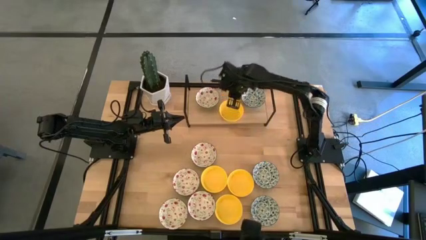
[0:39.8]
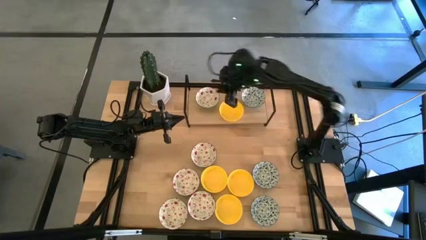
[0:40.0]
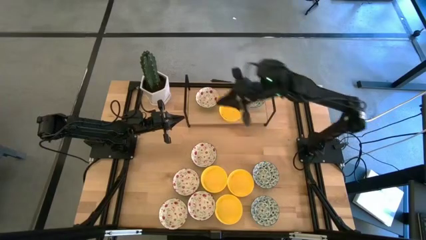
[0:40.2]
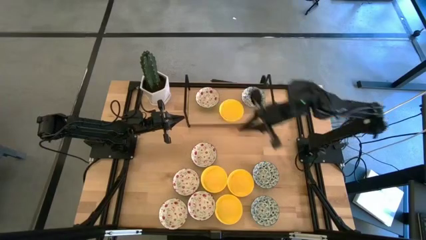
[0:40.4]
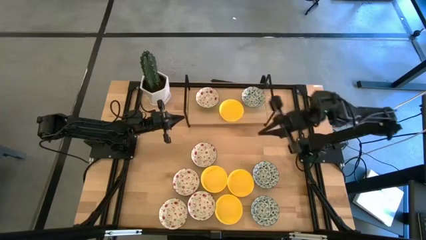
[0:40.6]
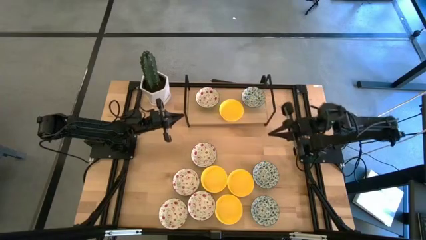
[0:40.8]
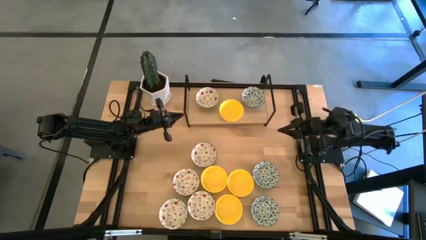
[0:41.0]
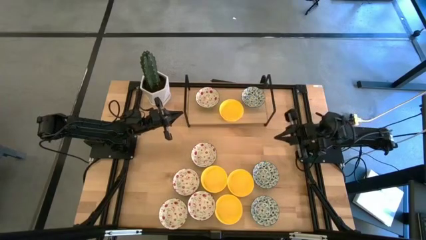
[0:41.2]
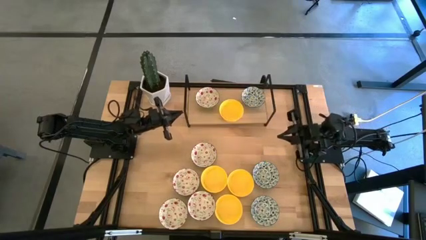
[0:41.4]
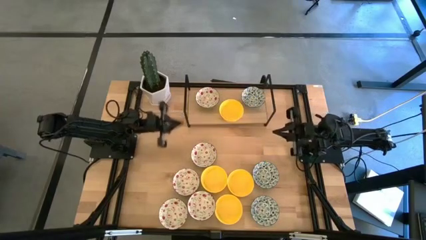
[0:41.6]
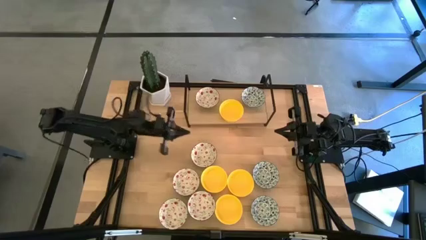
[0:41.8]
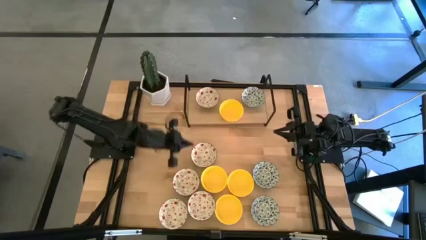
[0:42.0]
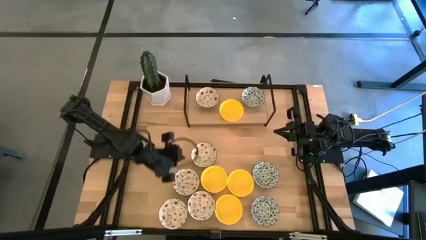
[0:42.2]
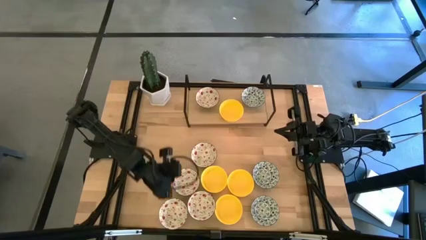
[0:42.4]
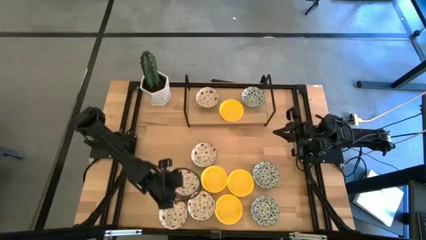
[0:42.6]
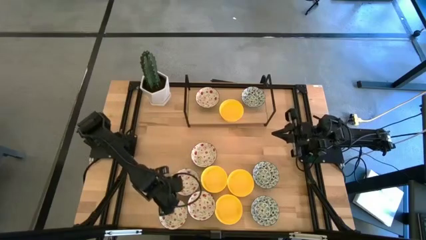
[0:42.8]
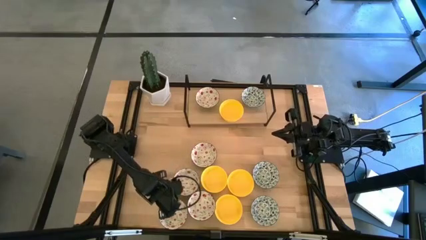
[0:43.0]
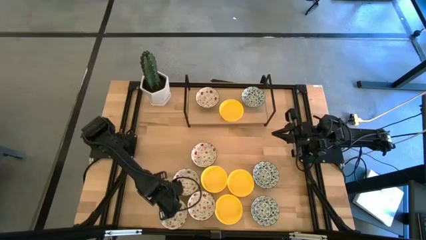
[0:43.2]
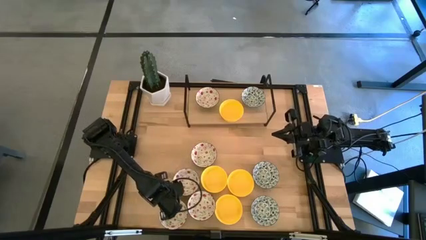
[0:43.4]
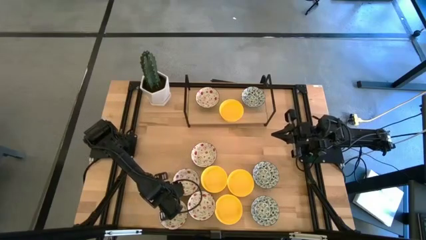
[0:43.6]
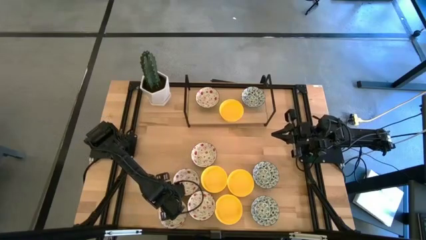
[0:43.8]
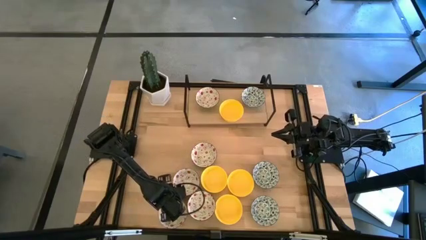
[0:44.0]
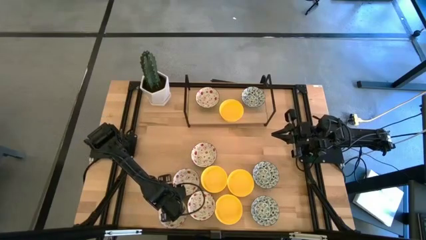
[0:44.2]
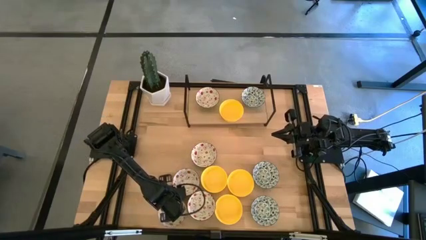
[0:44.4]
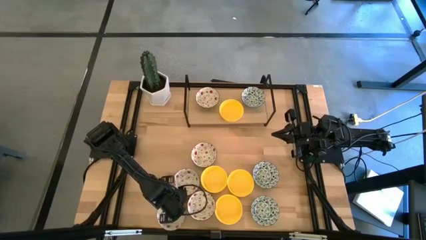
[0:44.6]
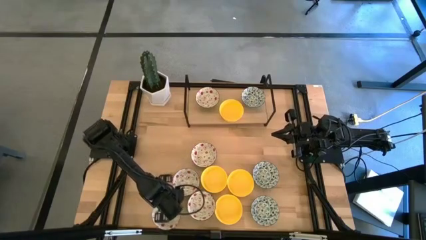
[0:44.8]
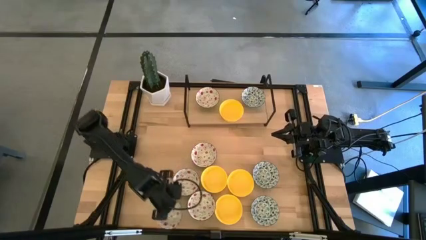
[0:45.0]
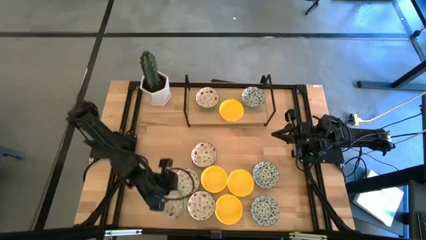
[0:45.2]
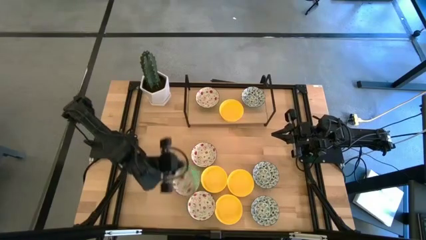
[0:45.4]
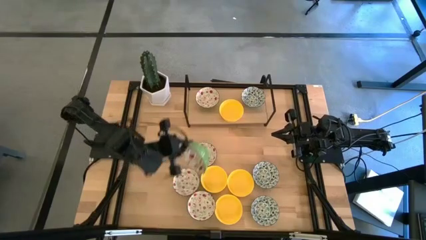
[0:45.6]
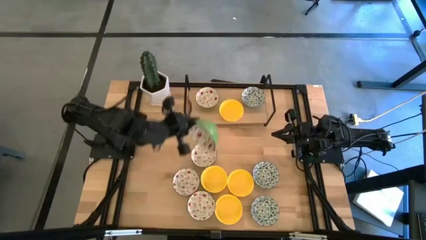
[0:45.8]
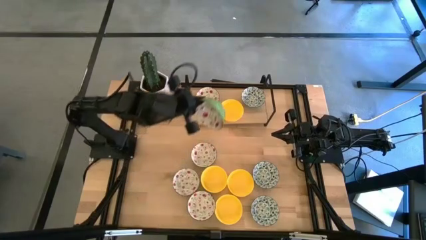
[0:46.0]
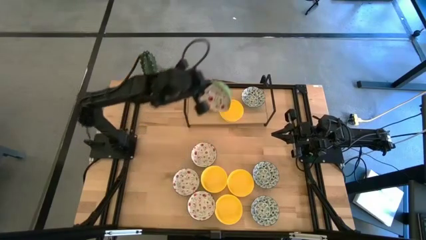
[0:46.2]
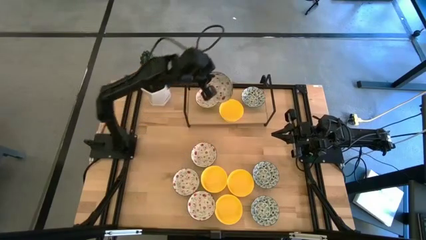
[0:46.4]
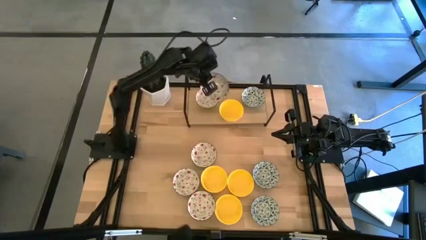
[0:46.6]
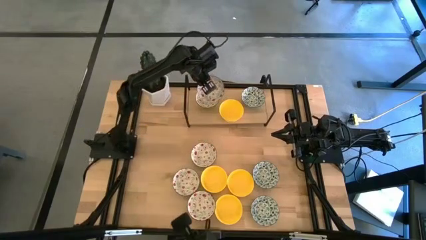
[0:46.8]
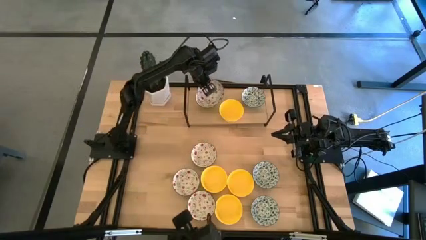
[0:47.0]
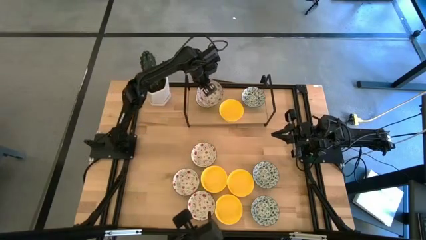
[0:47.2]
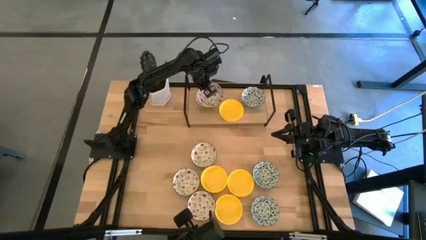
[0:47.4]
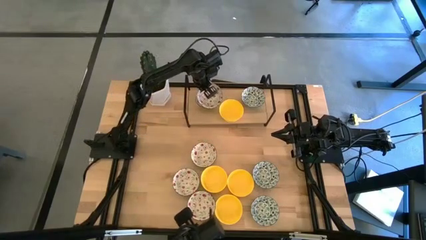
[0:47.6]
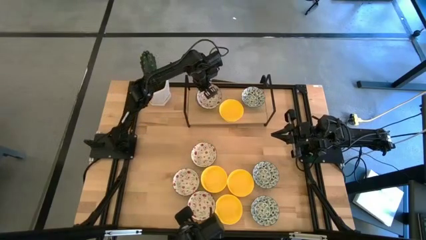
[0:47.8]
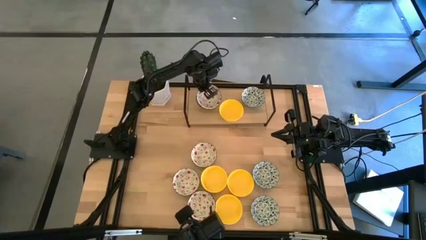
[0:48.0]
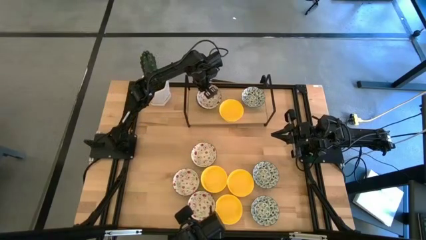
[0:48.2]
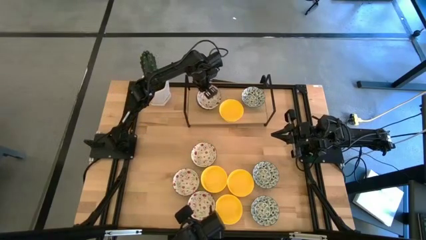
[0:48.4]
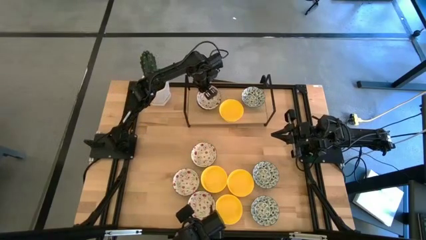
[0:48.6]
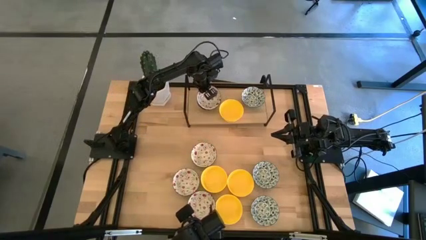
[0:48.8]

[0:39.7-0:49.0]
Task: Pick & Place Mini bowls
Stack the white bowl on top of the white bowl on the shelf
